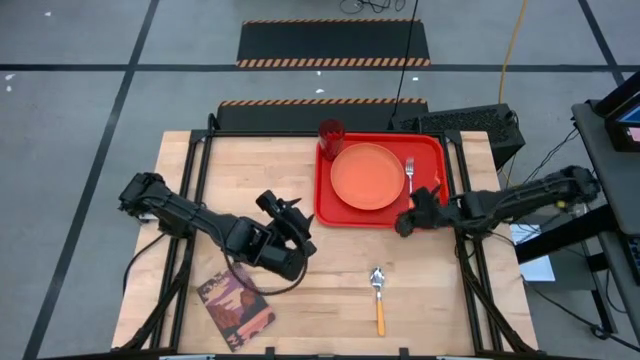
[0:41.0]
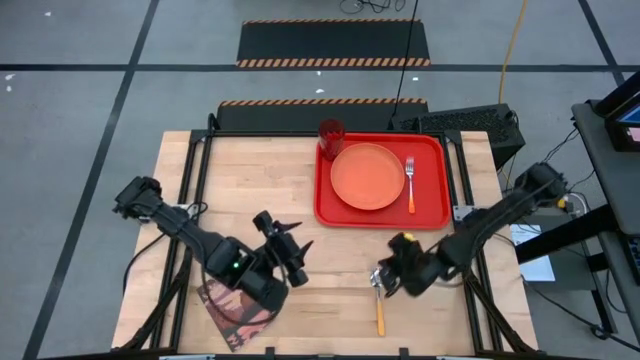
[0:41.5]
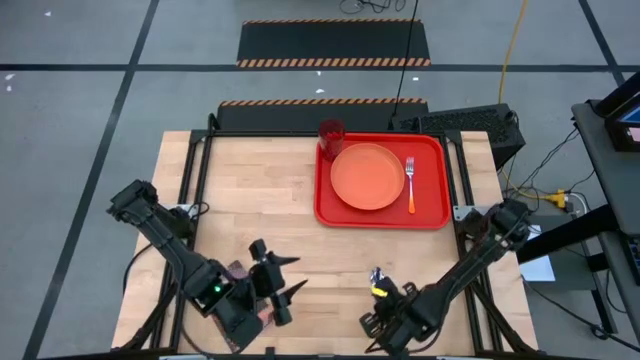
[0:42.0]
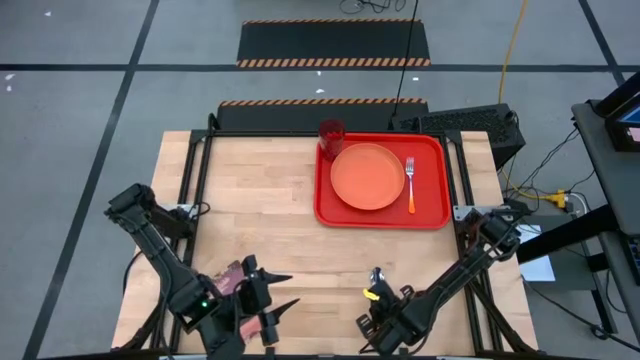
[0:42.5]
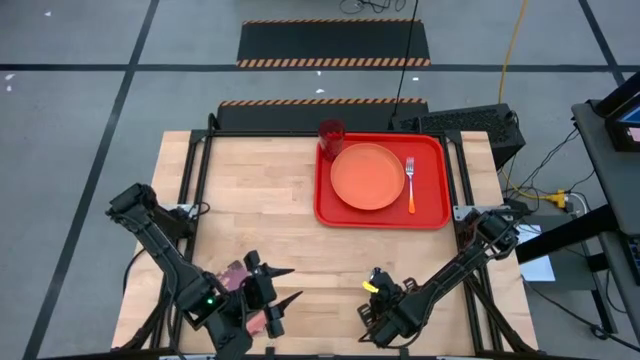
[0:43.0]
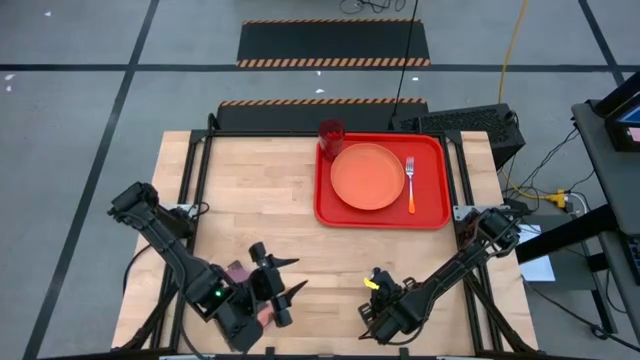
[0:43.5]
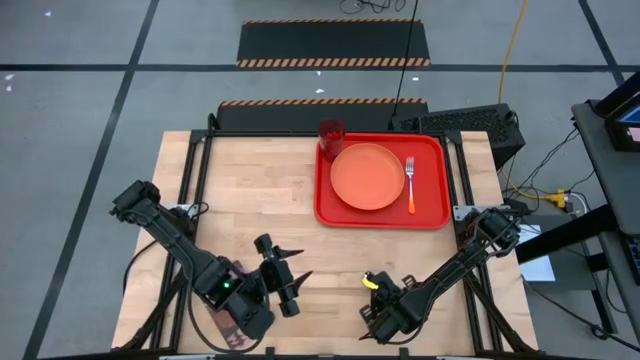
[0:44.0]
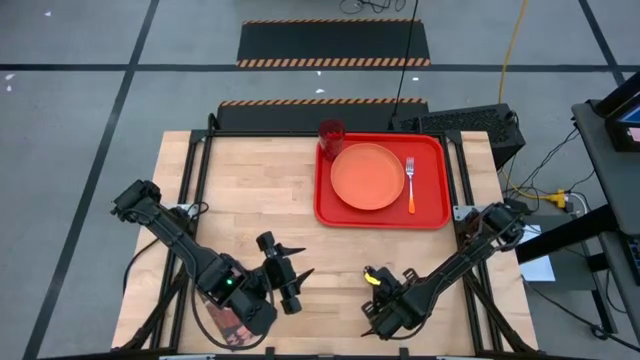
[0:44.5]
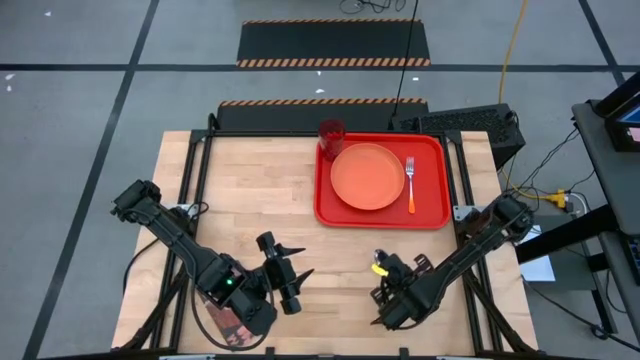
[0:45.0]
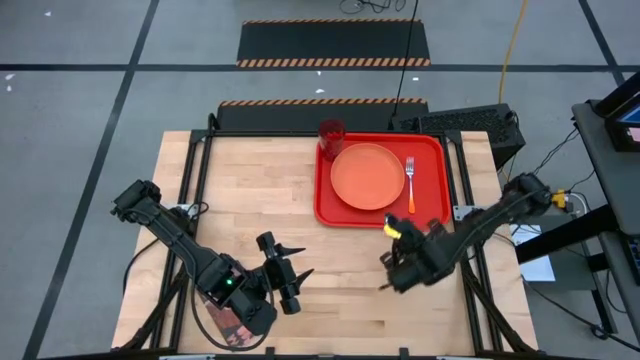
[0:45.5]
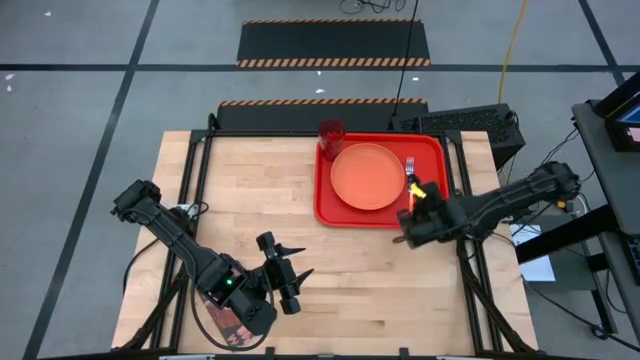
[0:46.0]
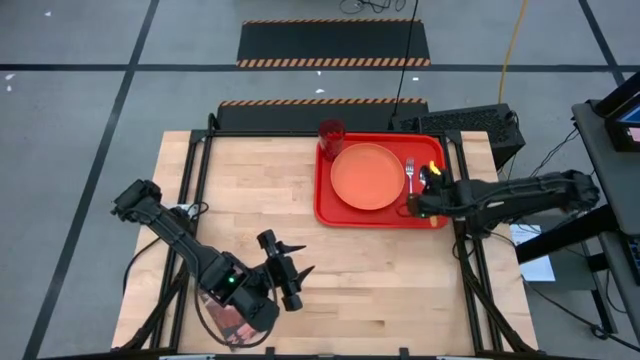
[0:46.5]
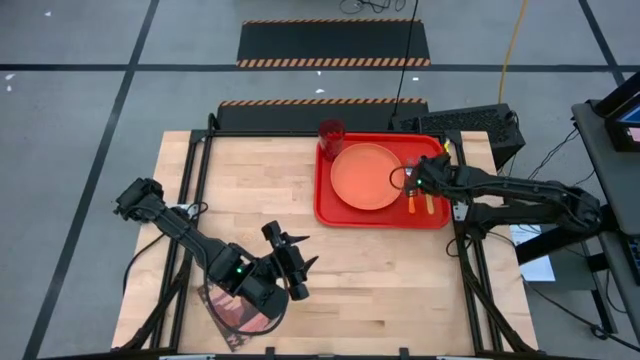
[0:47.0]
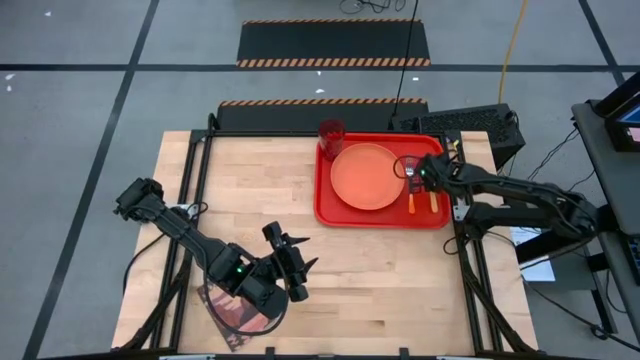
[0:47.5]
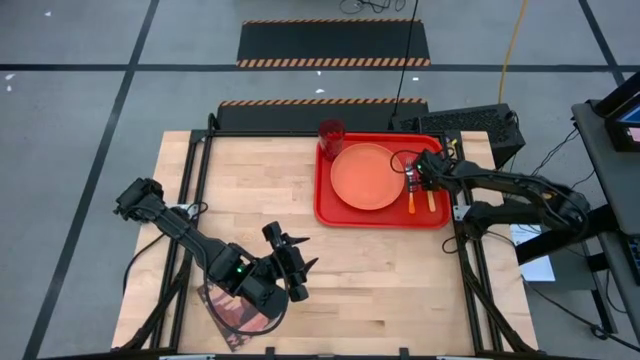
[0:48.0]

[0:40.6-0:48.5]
Task: Pick and place plate/cup/fork/spoon on tray
Put the yellow spoon beside the orange fork on the red tray

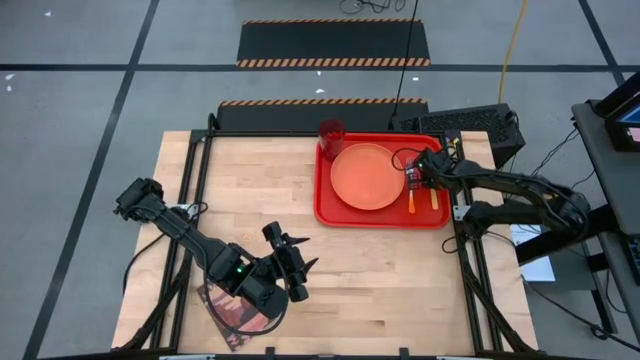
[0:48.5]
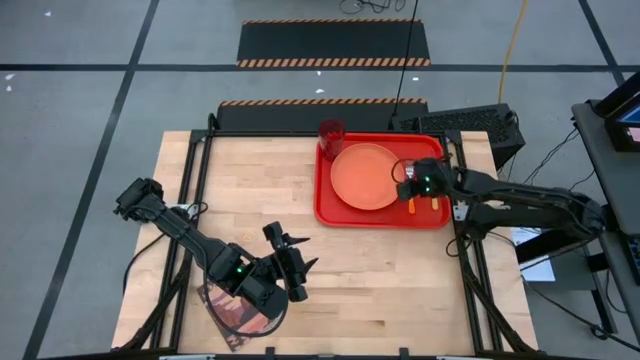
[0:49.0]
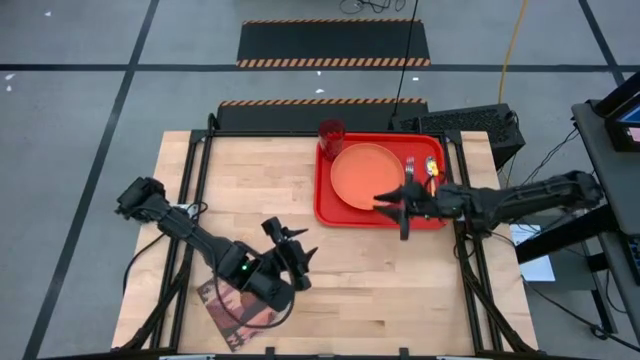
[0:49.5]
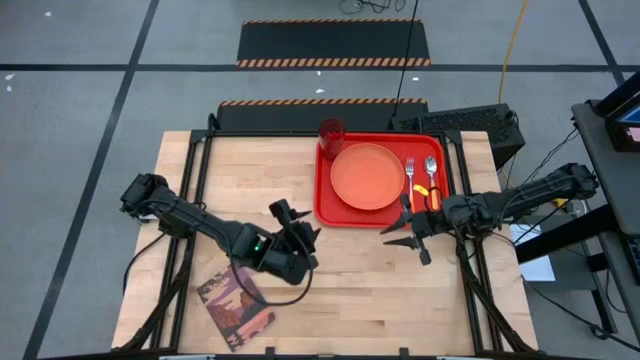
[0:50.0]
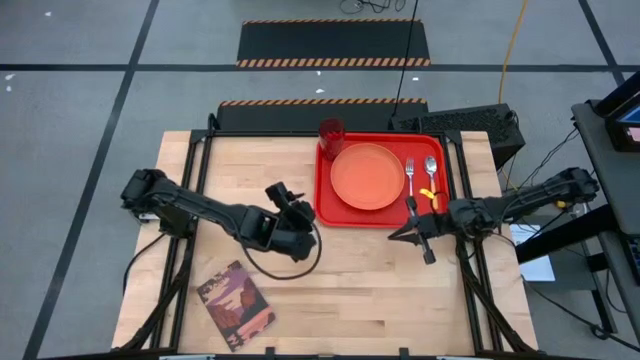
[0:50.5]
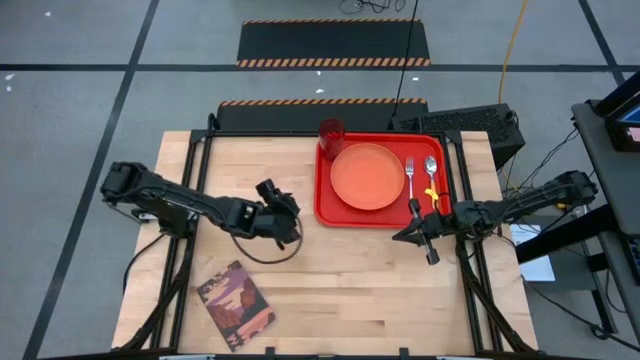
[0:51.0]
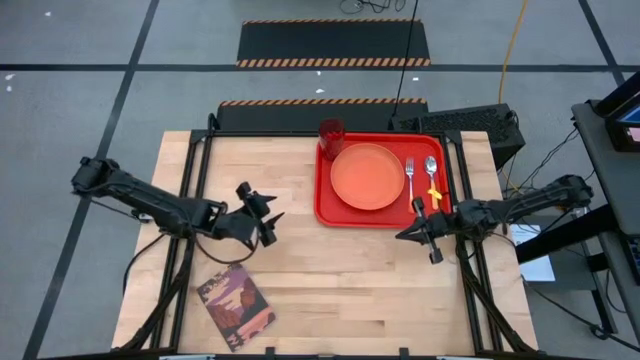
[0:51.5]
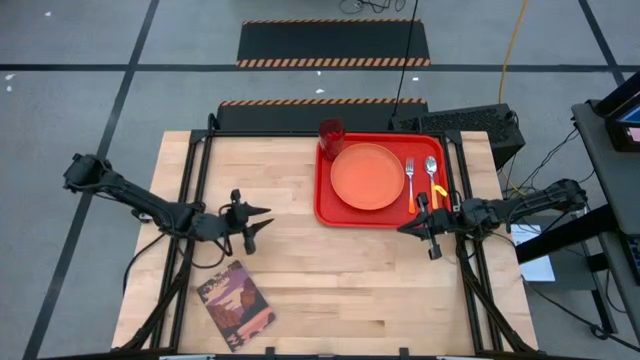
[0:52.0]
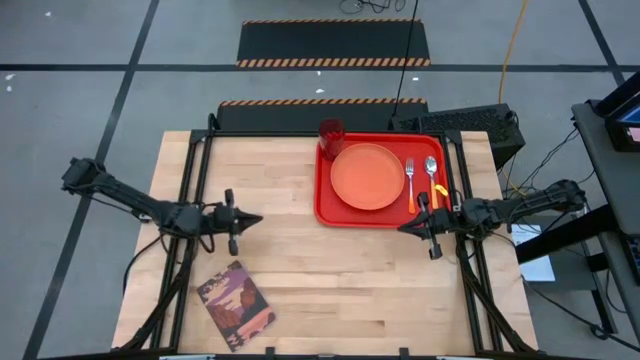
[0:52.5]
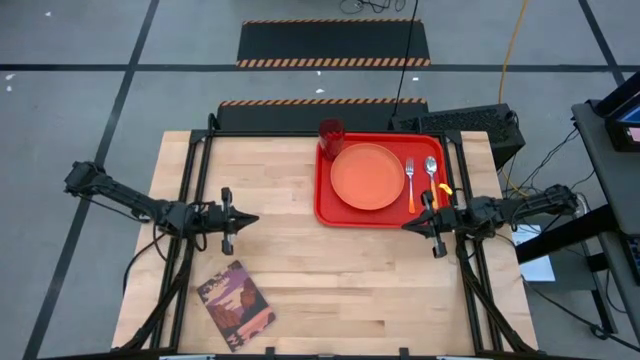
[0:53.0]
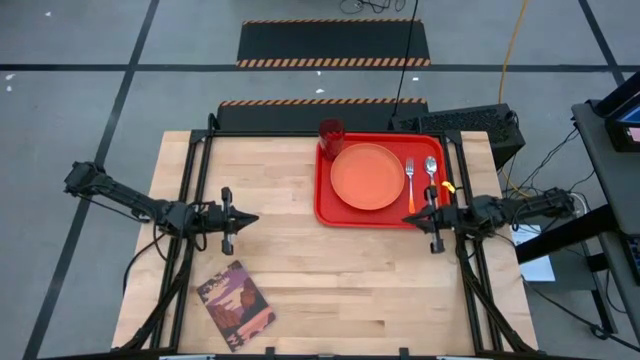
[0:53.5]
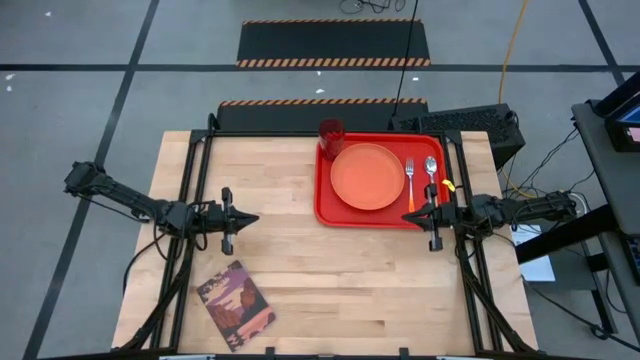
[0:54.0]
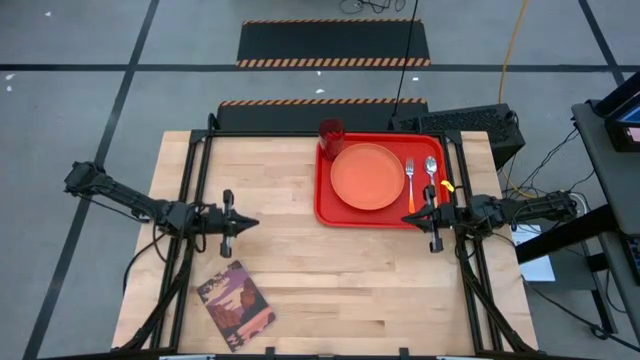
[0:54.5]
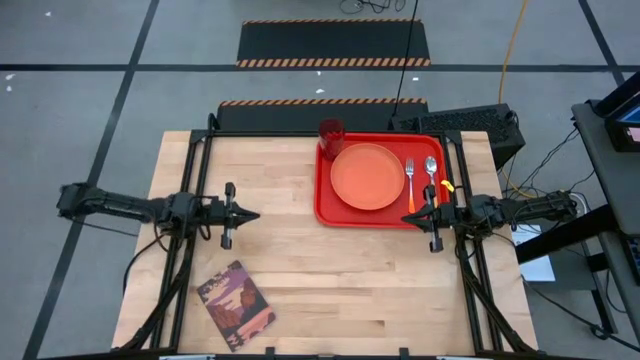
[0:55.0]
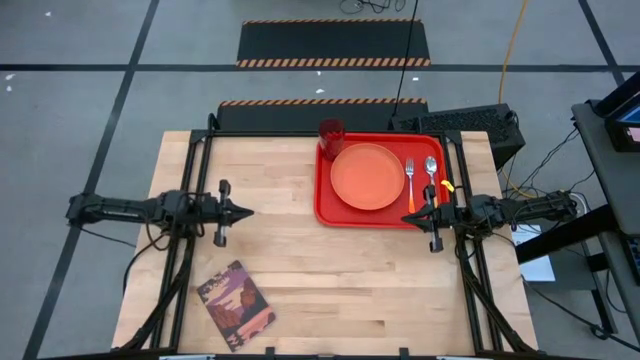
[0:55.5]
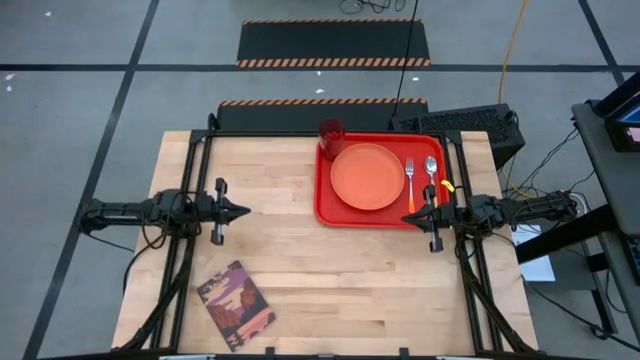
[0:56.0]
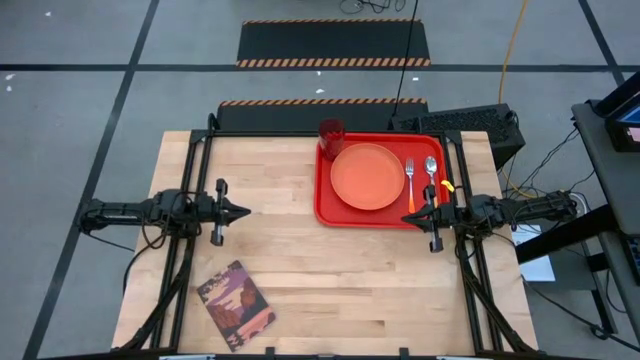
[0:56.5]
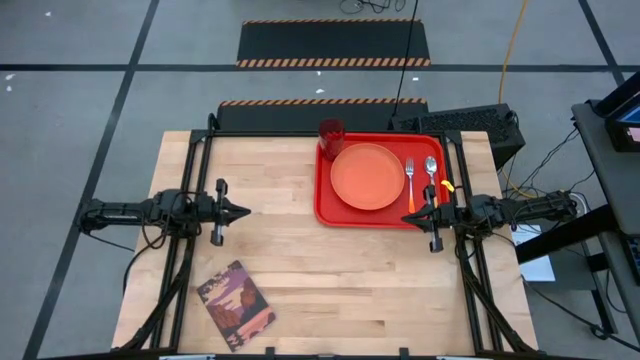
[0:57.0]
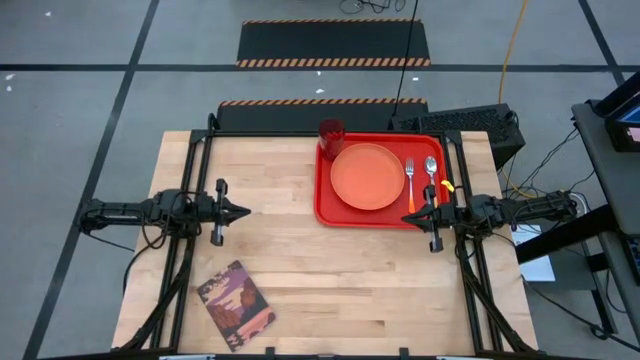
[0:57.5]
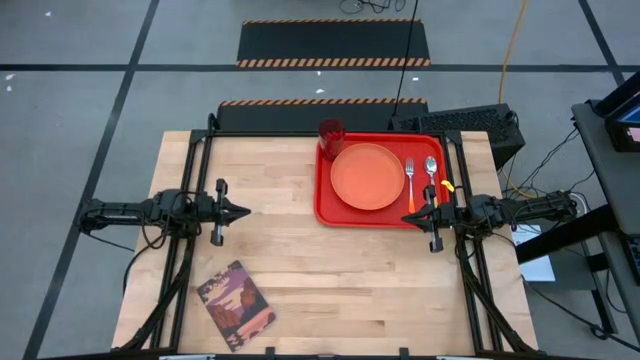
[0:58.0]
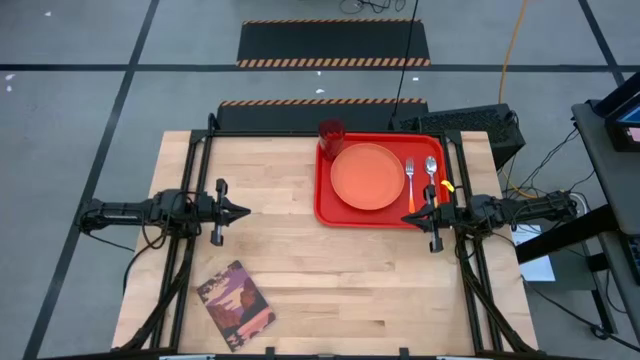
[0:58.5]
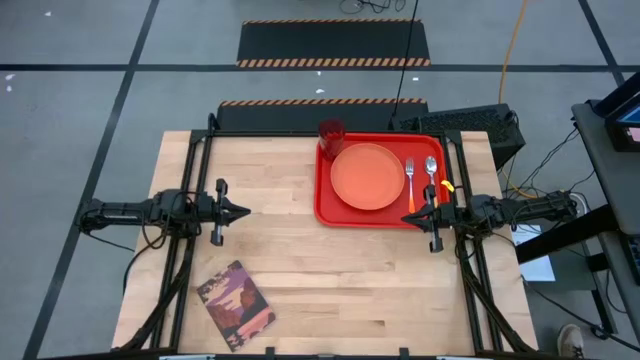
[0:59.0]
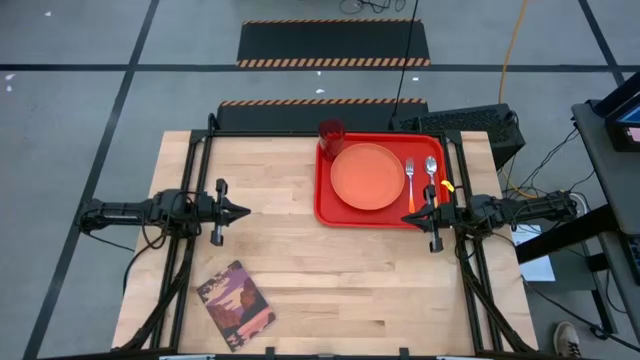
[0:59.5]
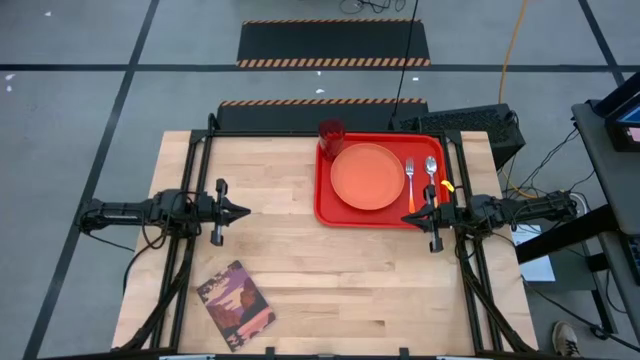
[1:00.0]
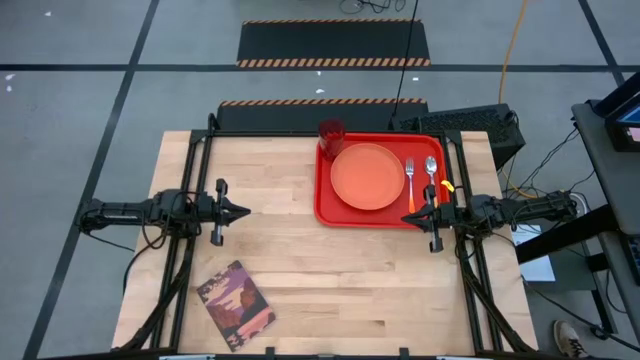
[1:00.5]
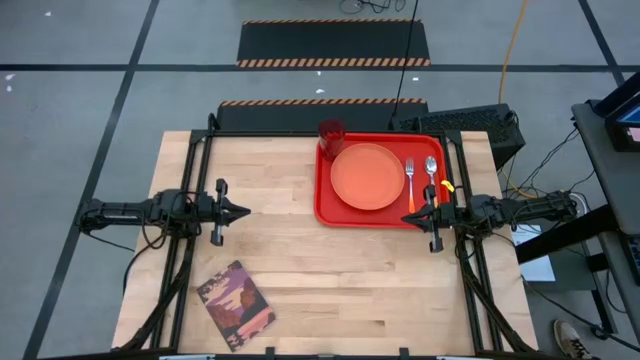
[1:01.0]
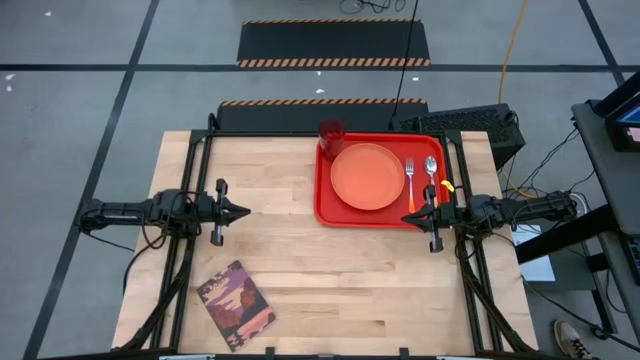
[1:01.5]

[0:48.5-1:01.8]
Return to Home Position

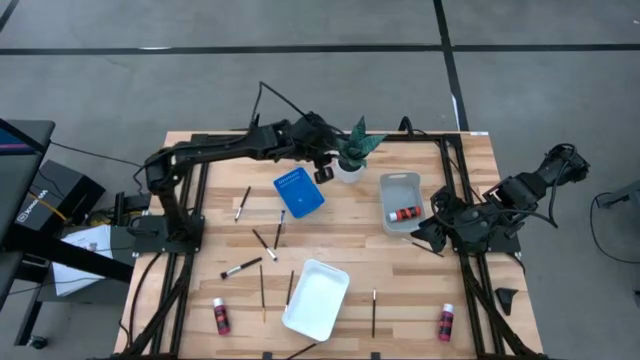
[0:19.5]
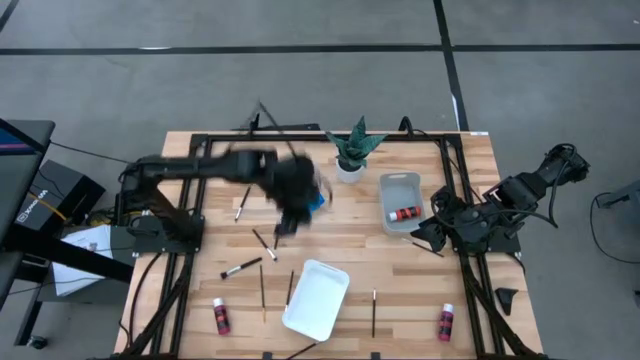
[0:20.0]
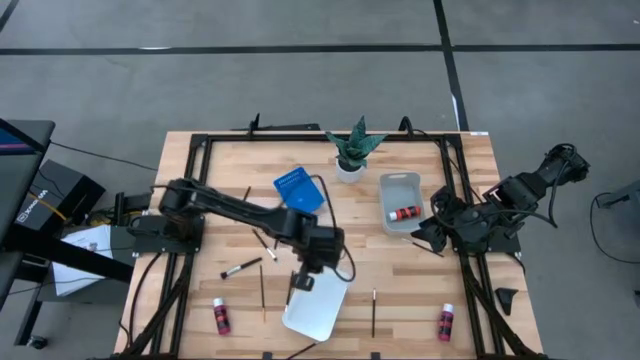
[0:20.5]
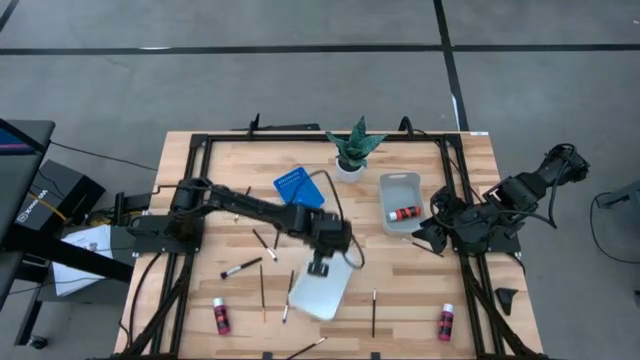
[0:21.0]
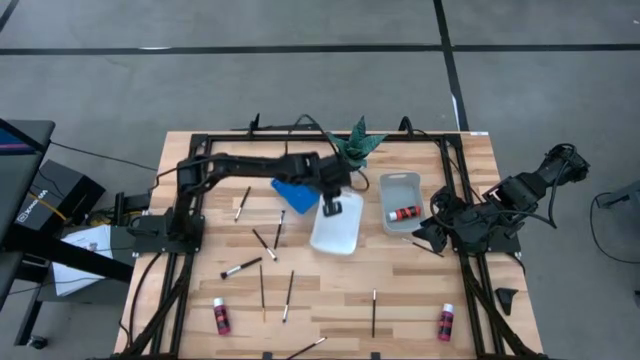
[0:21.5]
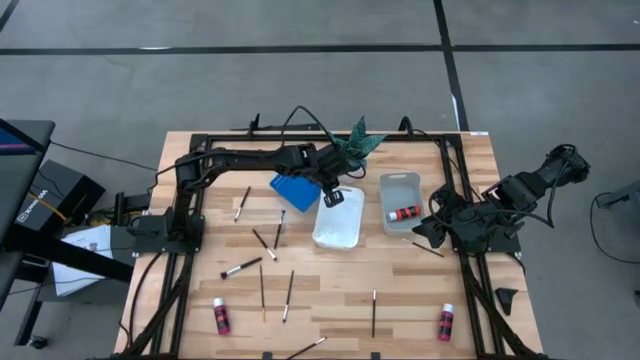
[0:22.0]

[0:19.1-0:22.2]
Task: Pick & Place Paint Supplies
Adjust the white bin
